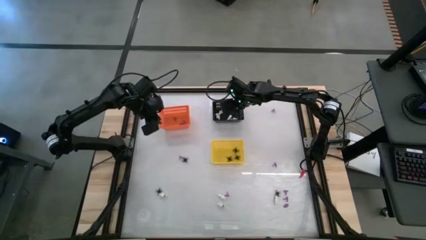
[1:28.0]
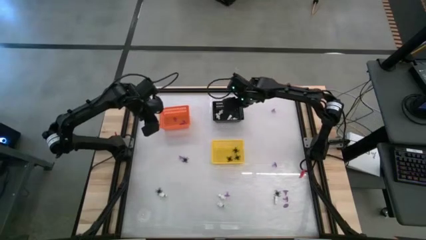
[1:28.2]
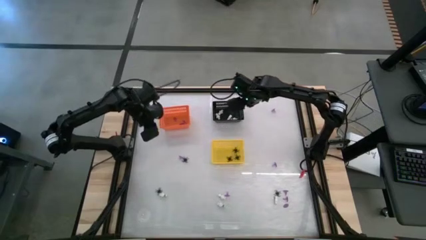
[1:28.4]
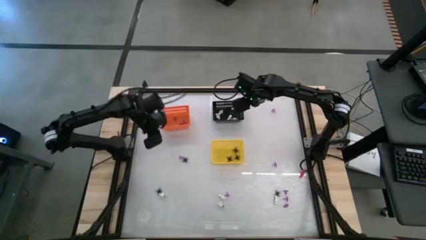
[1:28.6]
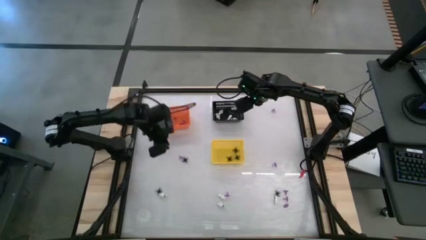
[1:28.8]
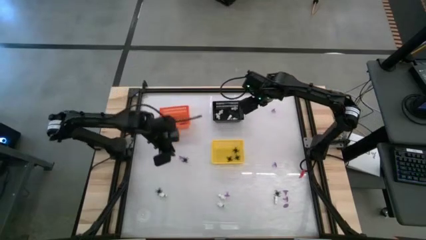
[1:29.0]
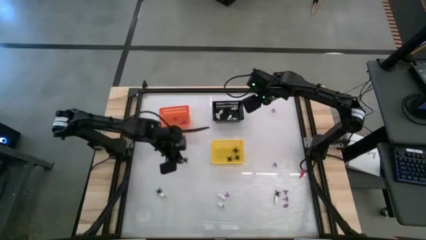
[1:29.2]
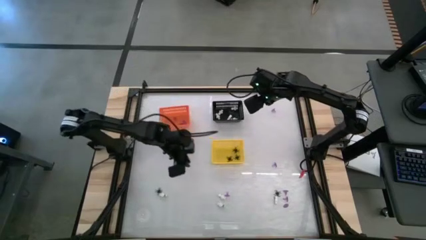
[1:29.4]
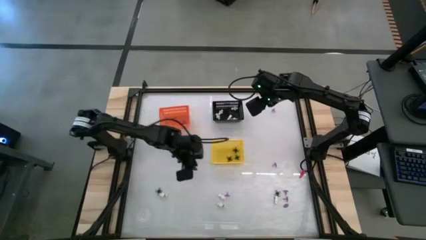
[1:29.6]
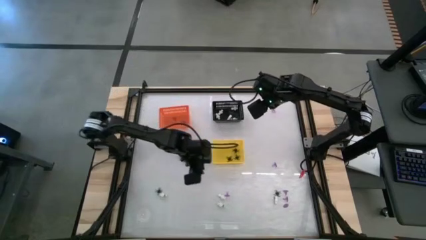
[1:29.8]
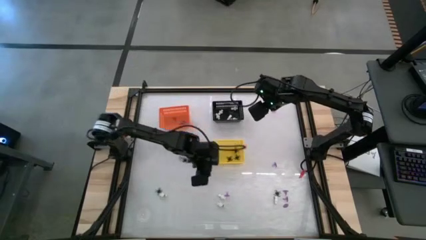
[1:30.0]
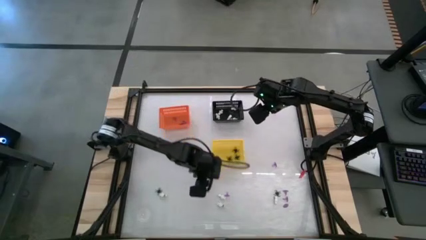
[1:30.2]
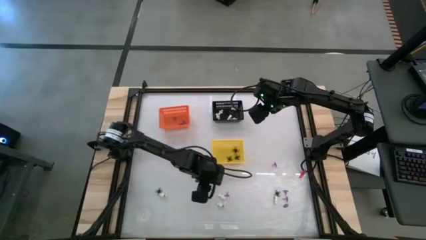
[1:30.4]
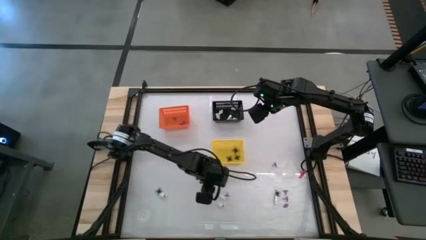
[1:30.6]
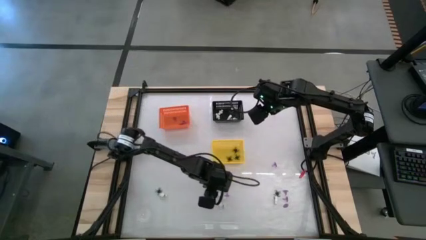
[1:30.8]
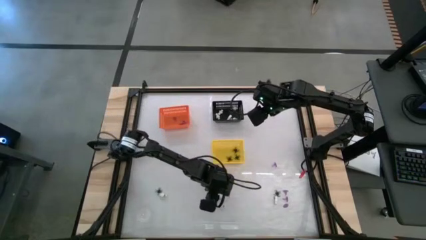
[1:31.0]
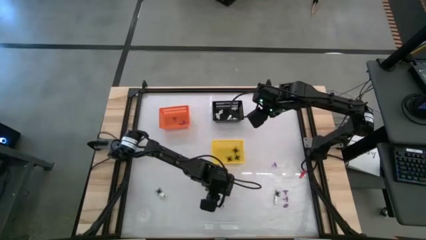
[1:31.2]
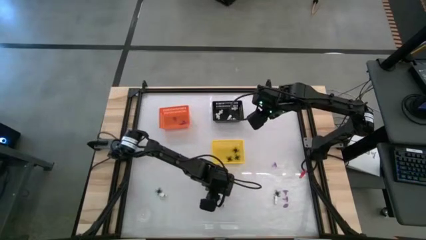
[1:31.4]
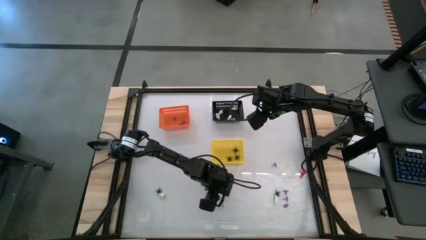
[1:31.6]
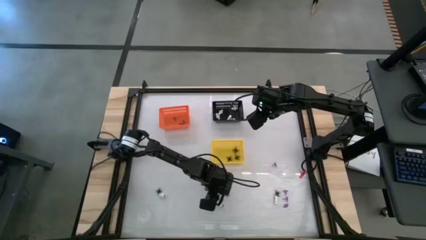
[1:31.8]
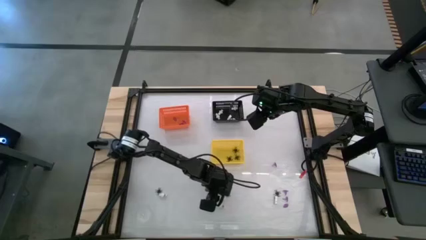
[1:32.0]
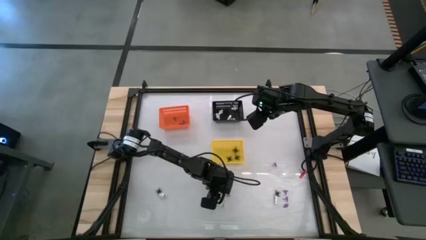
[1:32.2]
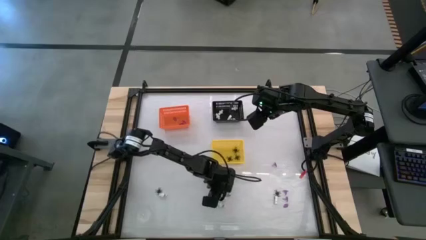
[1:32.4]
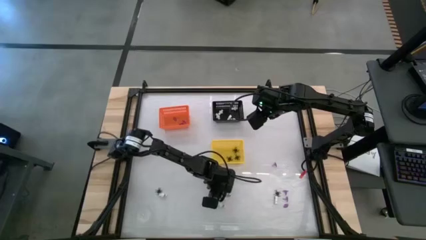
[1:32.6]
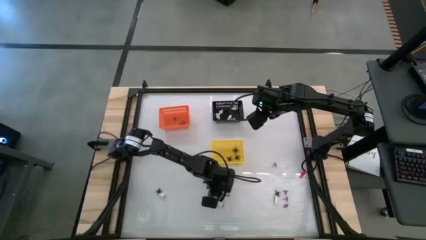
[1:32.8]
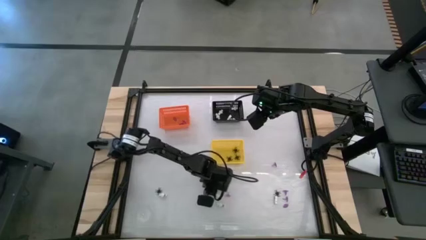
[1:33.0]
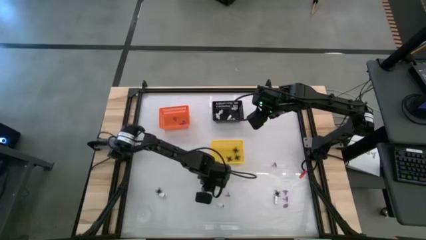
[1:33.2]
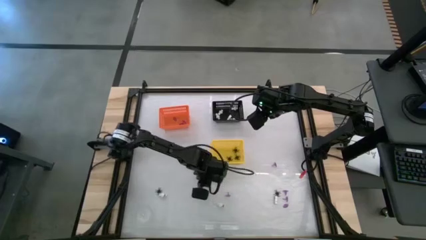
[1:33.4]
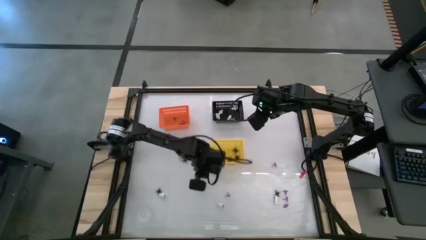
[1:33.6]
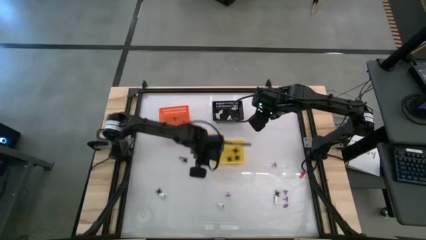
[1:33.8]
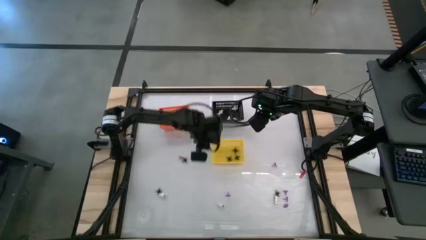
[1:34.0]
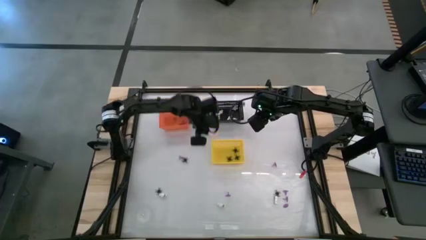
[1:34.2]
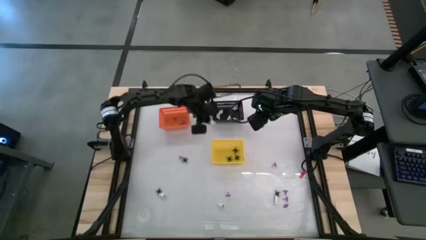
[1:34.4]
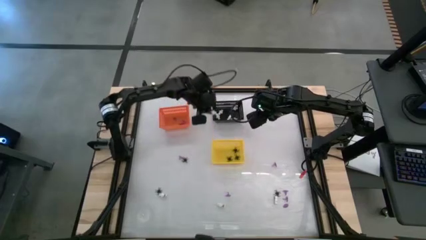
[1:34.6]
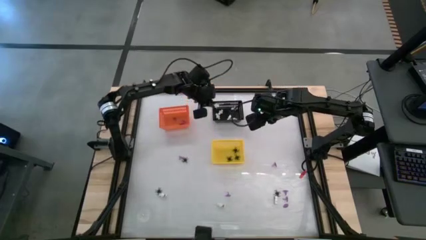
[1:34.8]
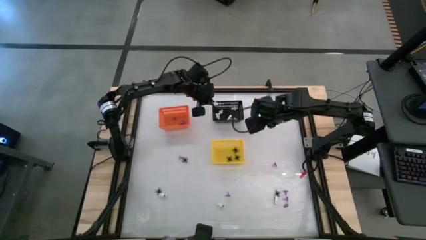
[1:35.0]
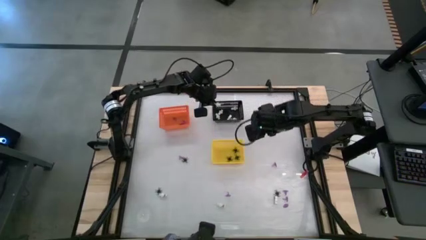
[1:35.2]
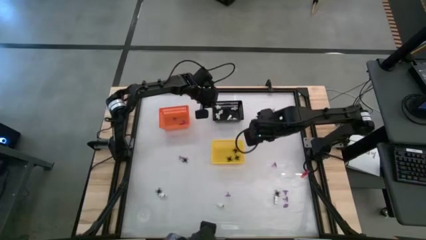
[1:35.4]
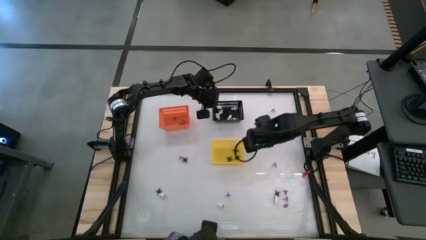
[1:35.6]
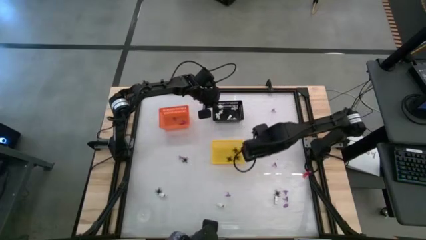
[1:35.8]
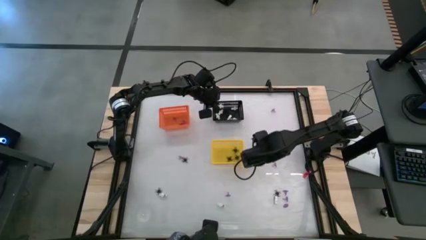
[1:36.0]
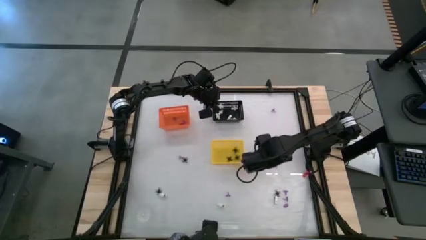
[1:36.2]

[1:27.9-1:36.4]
Task: Sort Halloween decoration
Put the white skeleton toy into the black bin

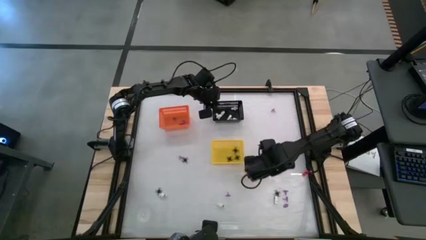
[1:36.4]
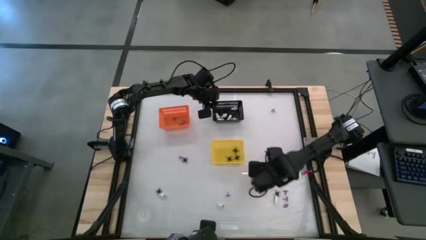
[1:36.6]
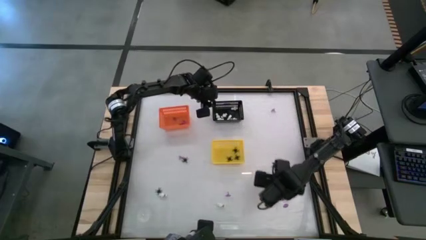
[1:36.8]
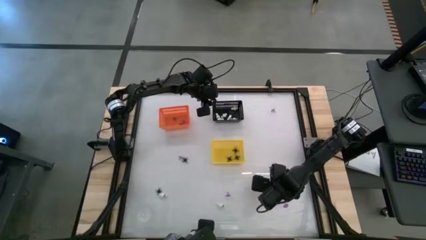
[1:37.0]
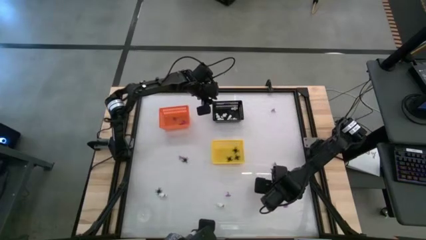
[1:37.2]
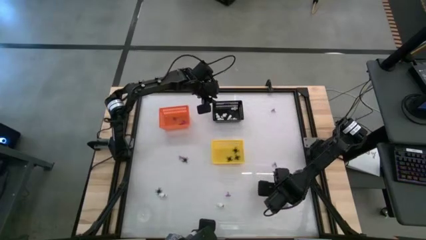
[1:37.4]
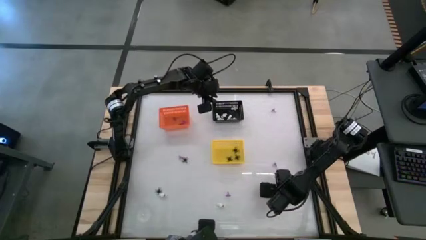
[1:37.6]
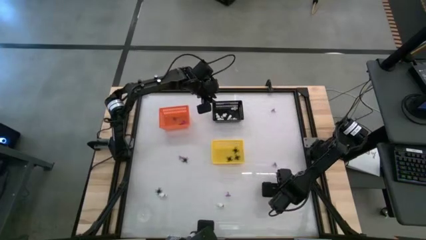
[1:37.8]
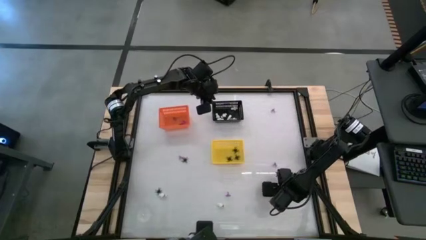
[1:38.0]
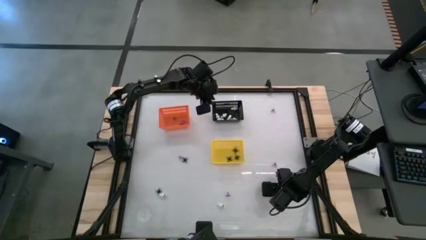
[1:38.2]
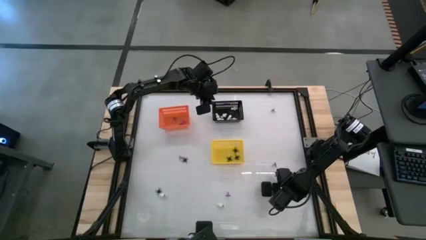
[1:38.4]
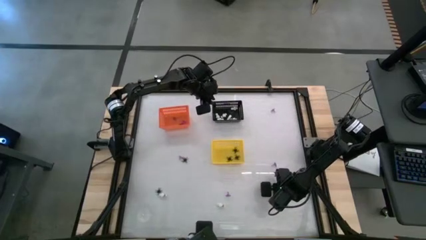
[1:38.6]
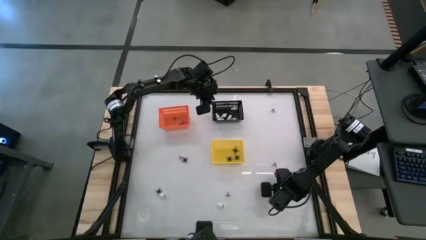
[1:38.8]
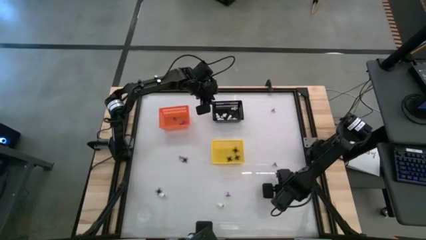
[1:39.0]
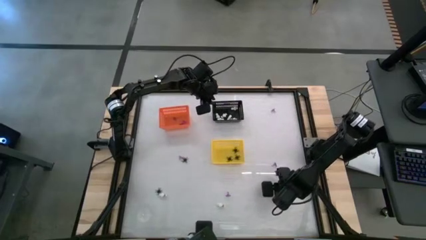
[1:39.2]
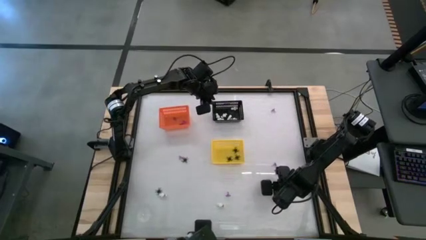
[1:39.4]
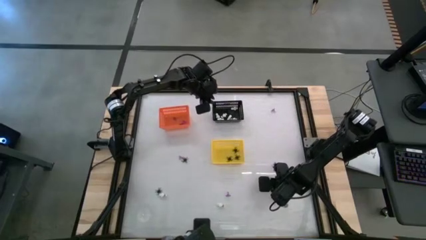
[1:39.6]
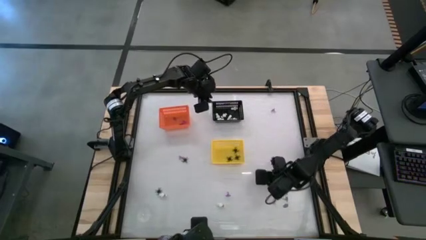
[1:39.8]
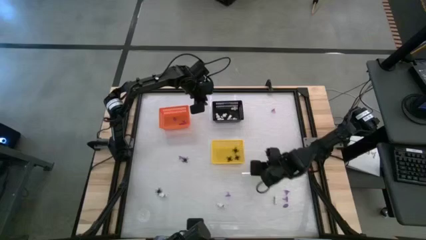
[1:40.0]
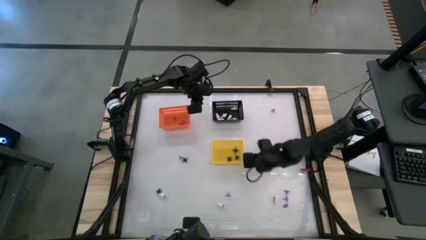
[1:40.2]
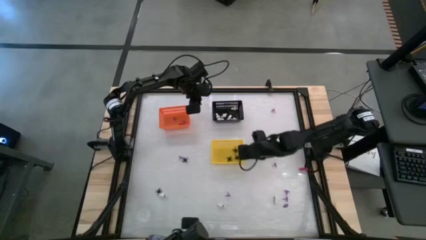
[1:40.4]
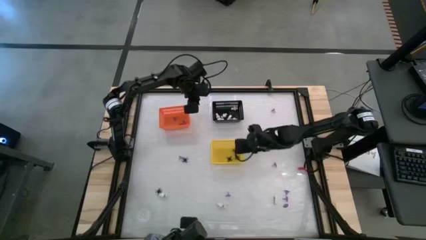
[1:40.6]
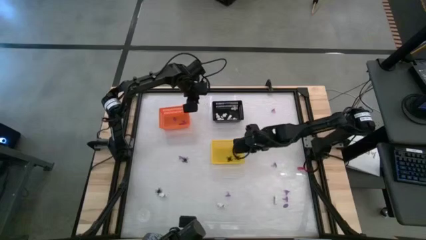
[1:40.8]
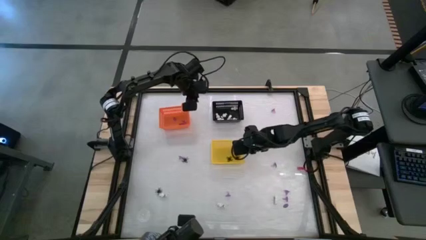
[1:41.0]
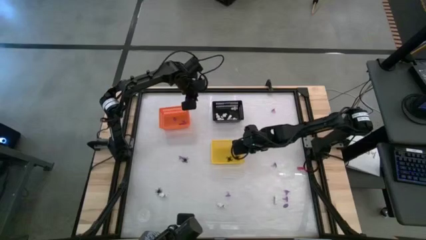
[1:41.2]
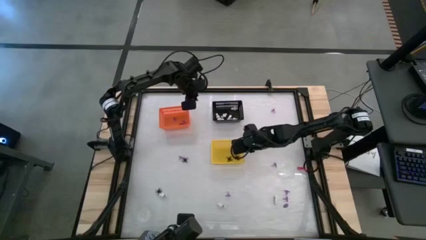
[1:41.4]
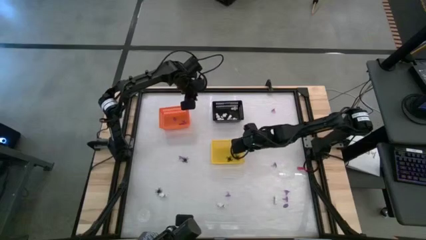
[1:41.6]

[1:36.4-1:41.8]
Put the black spider toy into the yellow bin

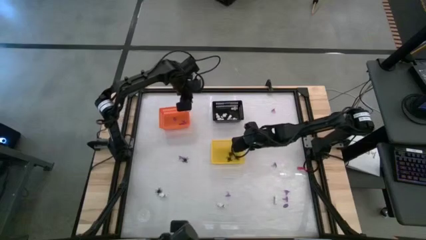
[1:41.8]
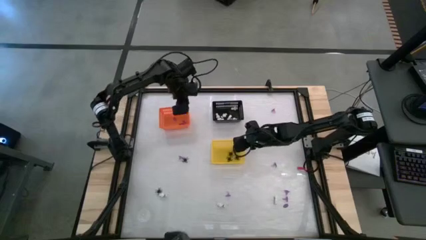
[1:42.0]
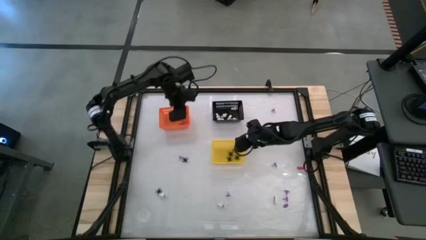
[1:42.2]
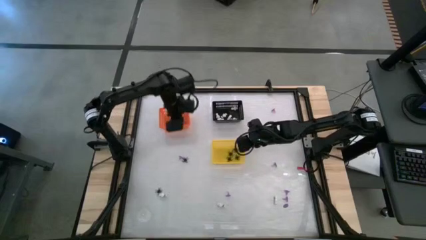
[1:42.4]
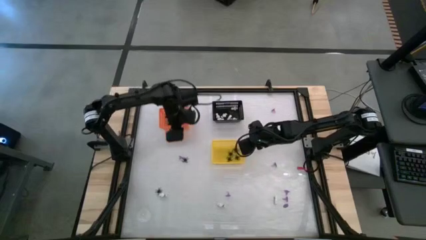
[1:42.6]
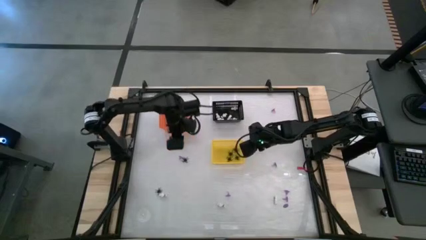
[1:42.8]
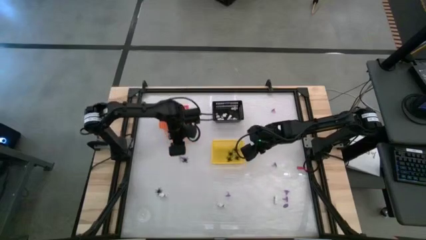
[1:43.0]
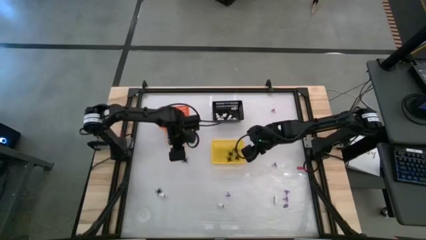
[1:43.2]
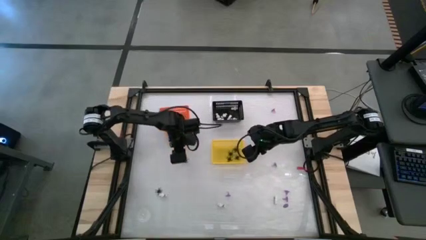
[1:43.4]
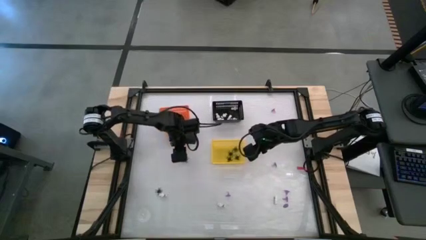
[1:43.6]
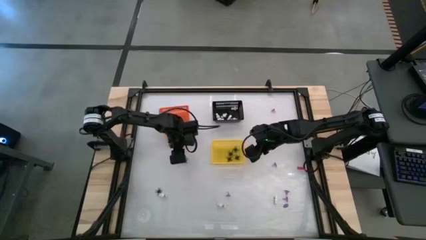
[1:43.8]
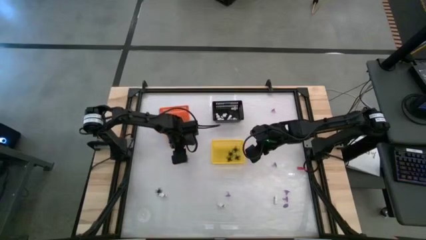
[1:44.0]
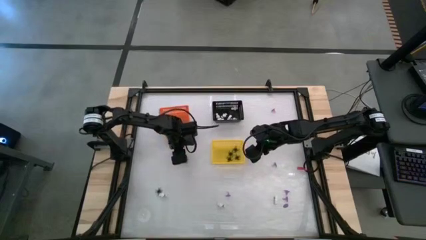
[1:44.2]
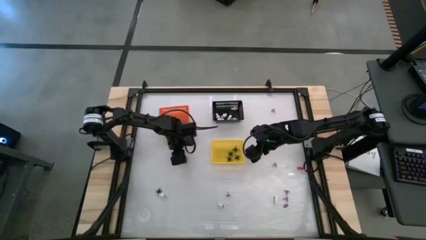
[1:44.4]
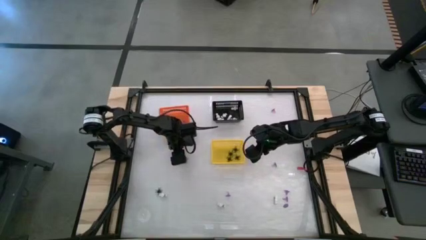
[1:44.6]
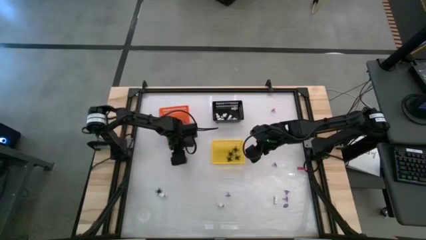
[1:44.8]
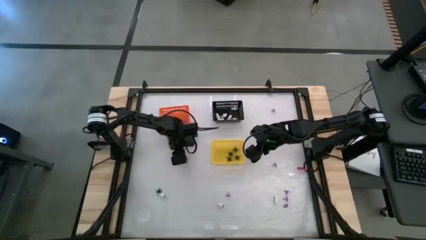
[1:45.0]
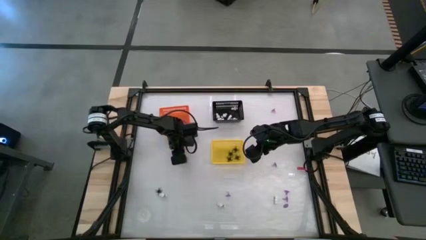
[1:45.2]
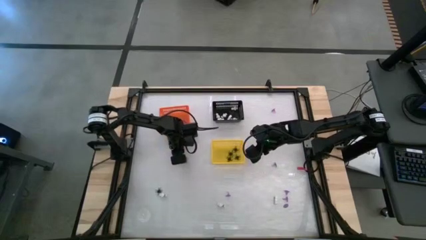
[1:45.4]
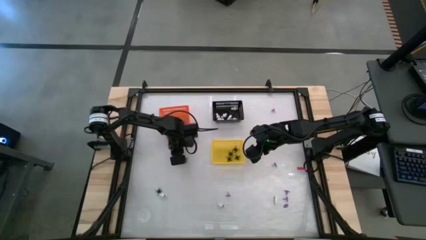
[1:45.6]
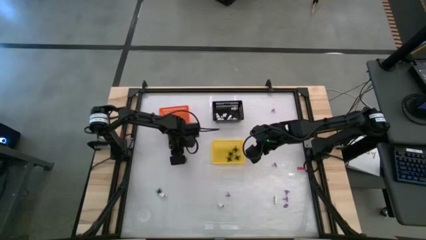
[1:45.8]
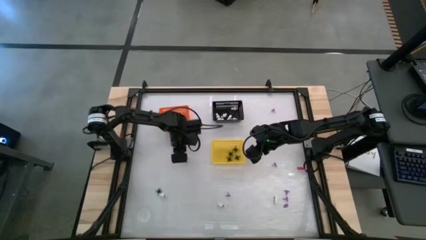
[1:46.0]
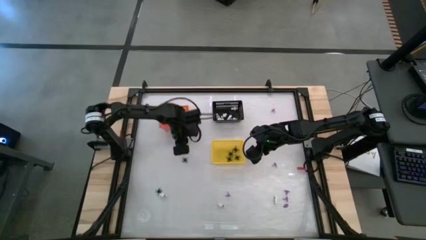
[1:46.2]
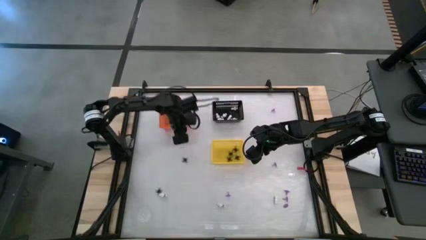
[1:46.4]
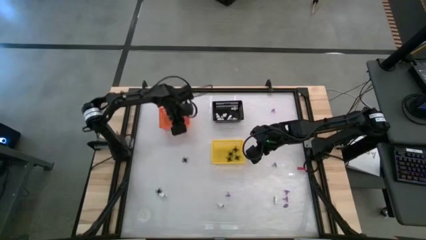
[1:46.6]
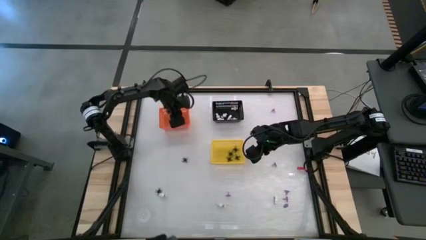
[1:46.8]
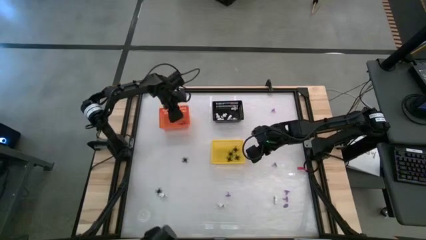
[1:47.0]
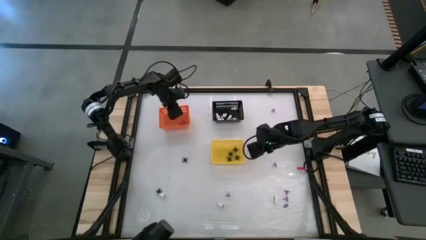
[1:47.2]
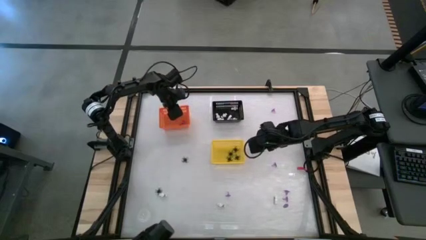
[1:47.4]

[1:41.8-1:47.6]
Put the violet witch hat into the orange bin
